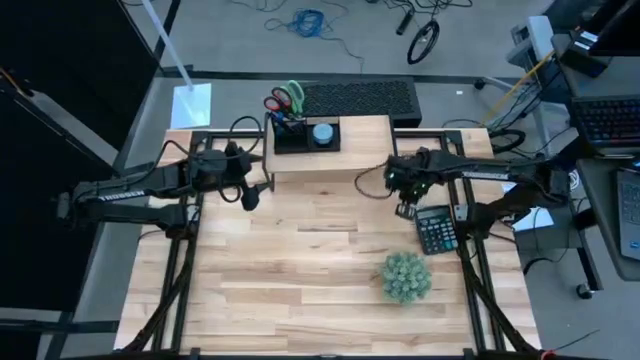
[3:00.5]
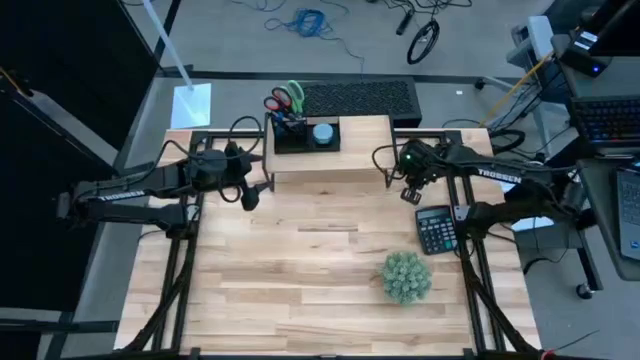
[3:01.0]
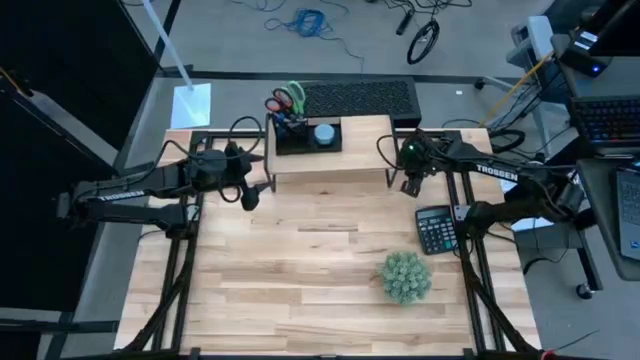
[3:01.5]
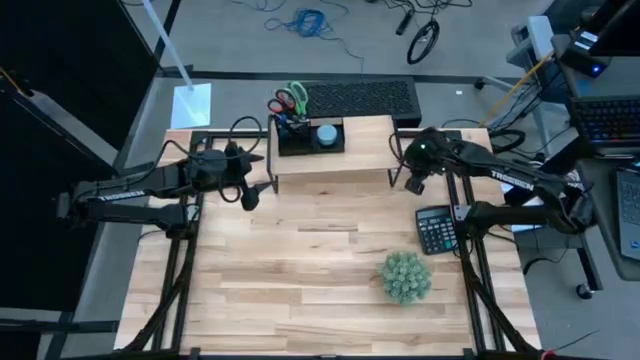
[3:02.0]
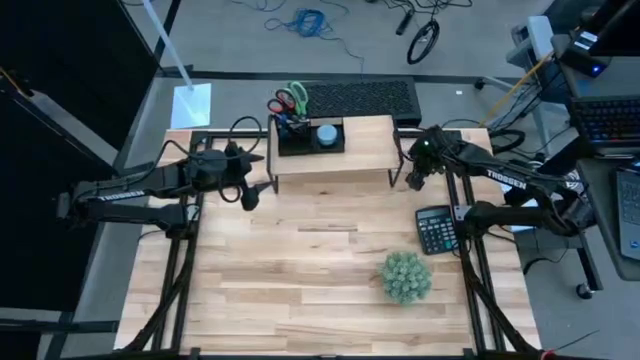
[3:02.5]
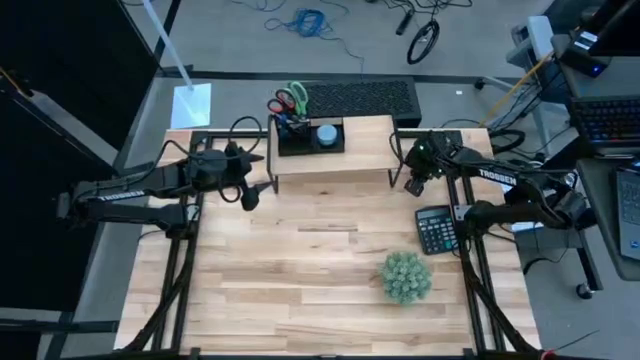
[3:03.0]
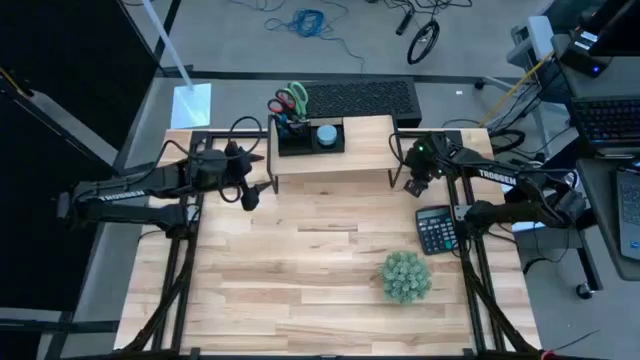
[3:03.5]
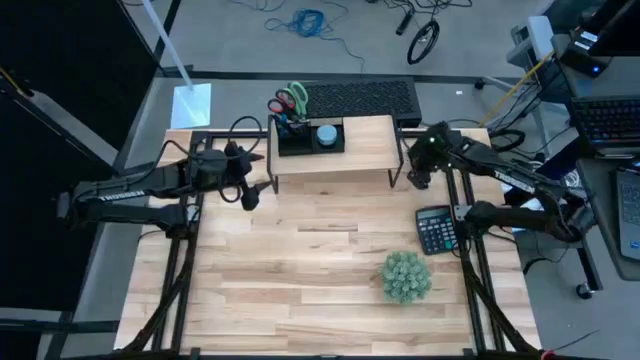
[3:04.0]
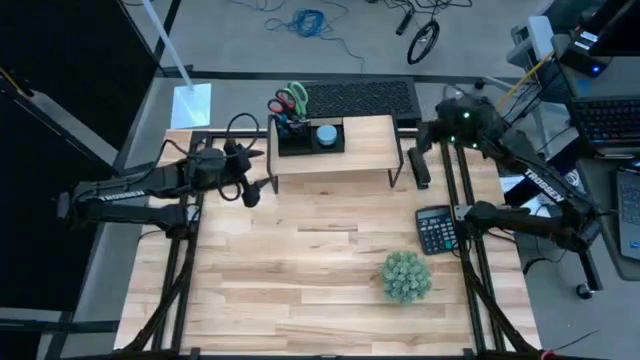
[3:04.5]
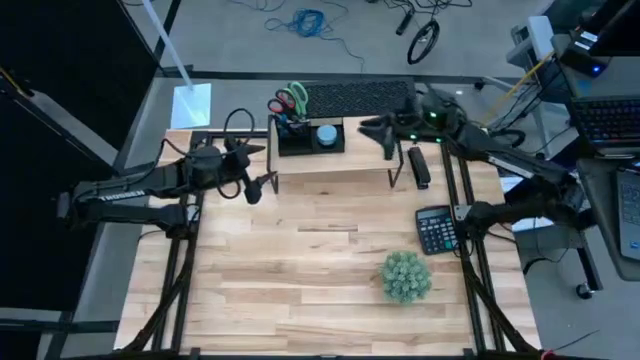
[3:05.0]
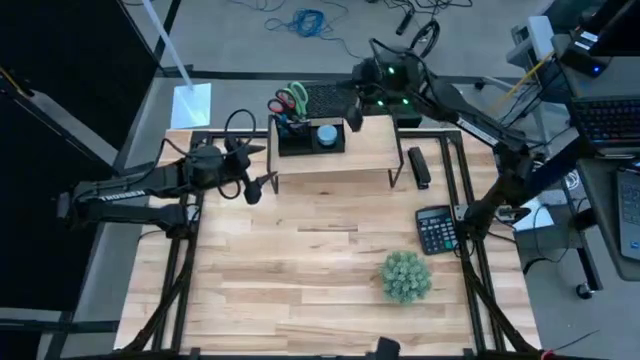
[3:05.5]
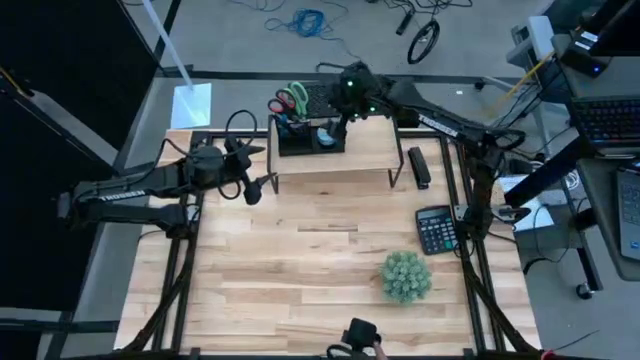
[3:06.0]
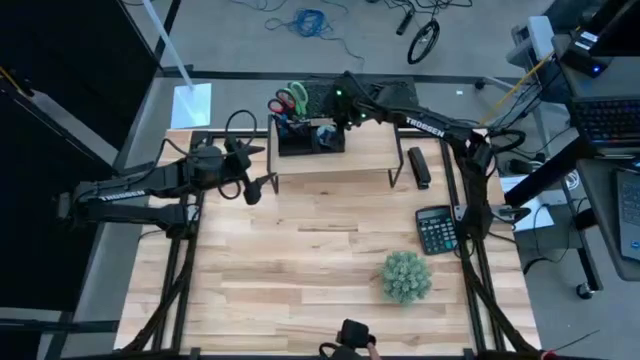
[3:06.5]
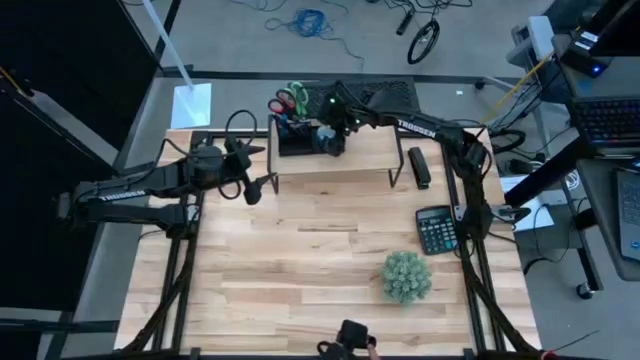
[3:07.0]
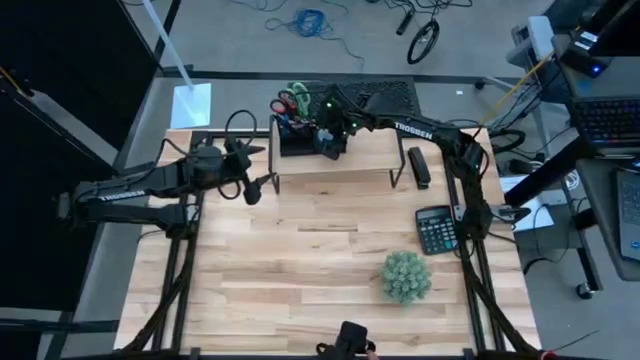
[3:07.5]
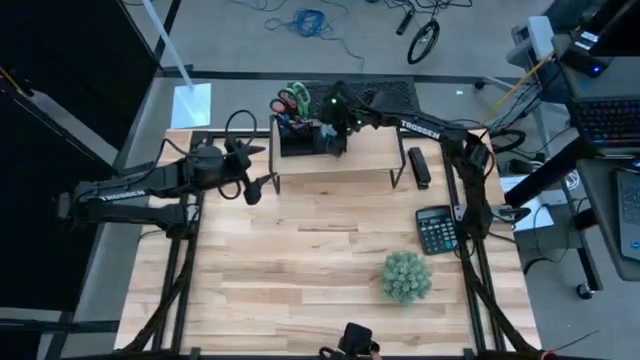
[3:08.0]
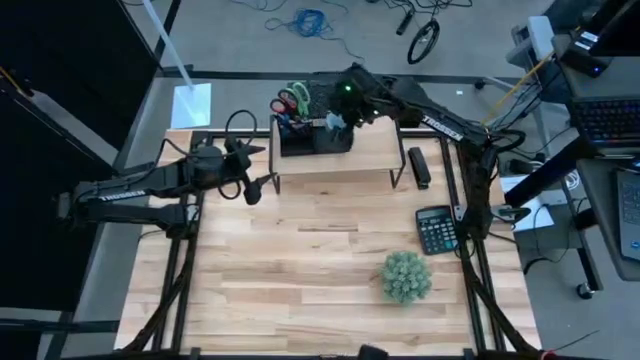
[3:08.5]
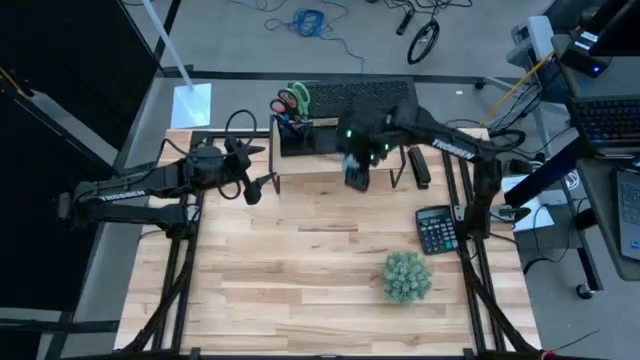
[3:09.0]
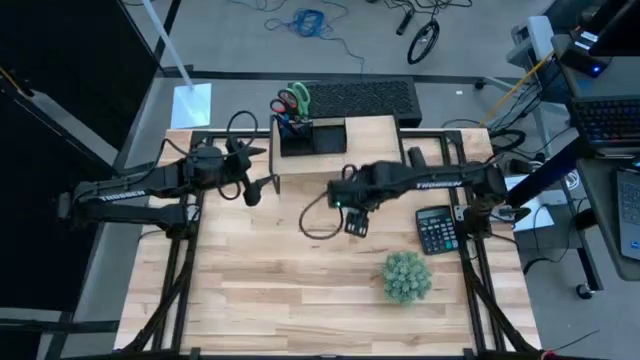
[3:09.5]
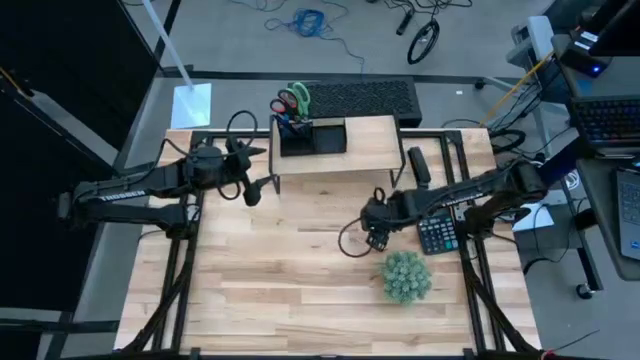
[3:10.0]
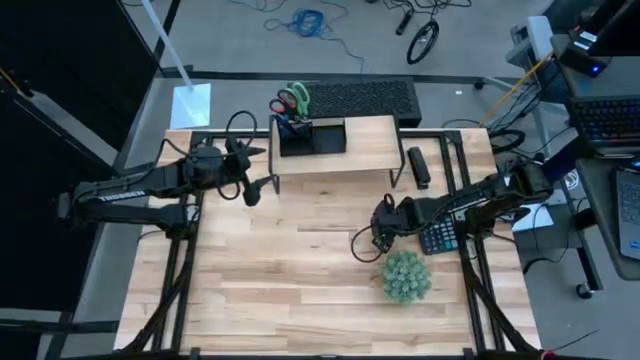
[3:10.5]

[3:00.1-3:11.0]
Task: Pick and place office supplies into organizer
Remove the green scented candle from the desk organizer on the shelf

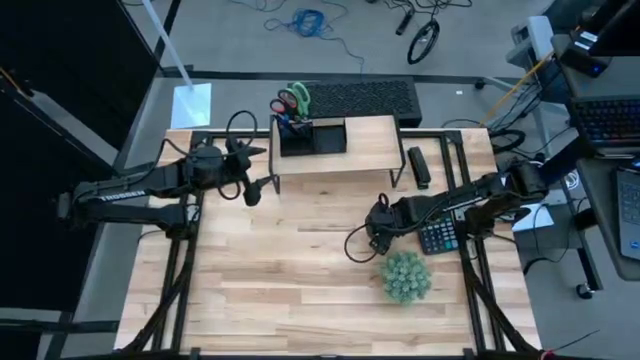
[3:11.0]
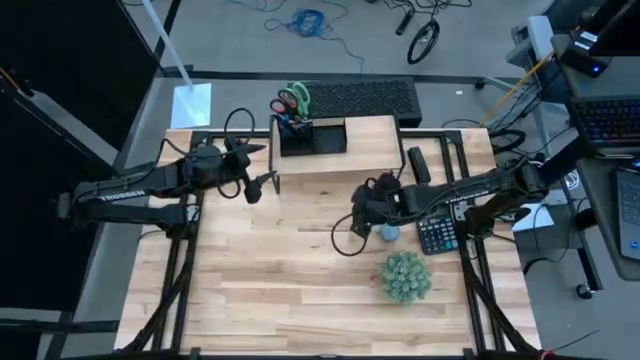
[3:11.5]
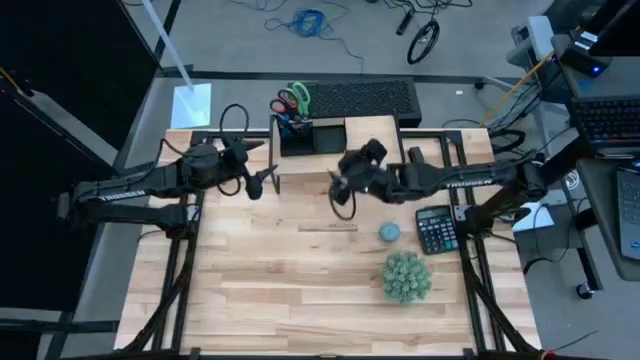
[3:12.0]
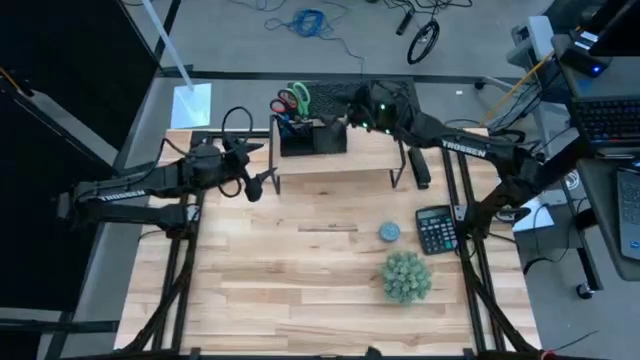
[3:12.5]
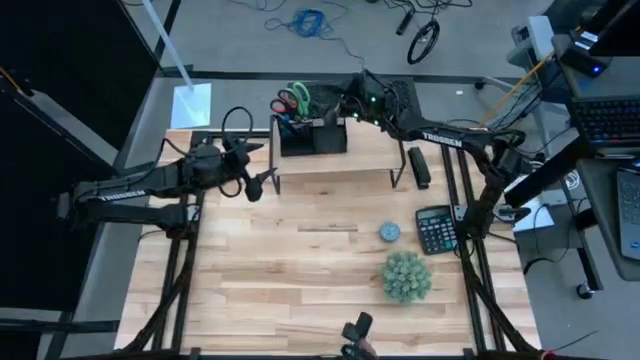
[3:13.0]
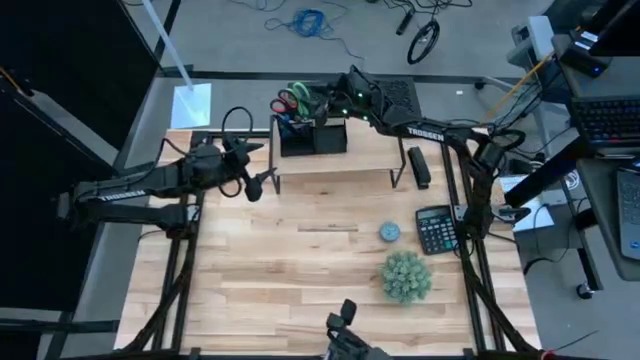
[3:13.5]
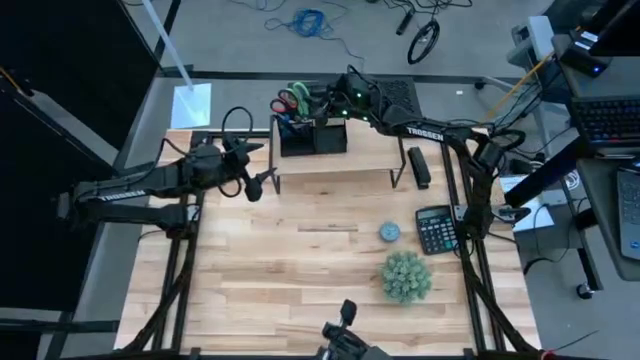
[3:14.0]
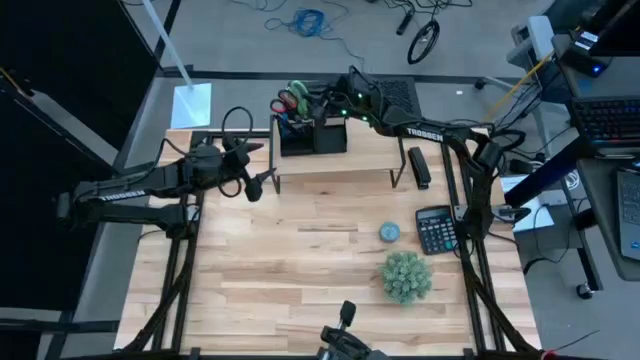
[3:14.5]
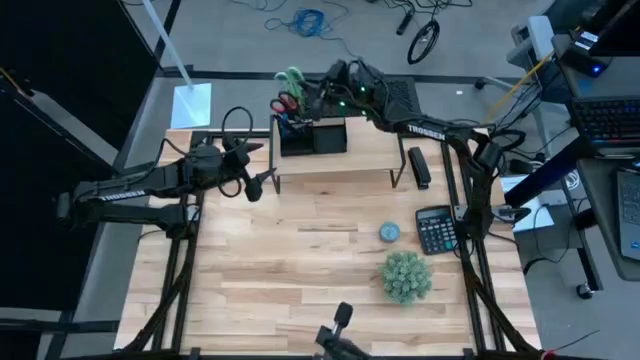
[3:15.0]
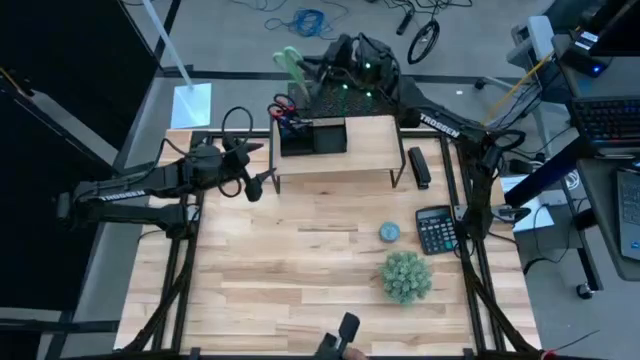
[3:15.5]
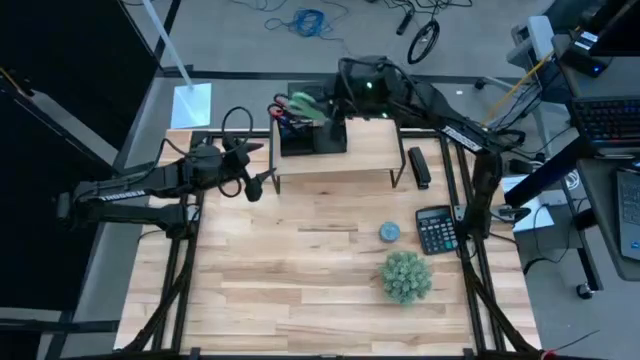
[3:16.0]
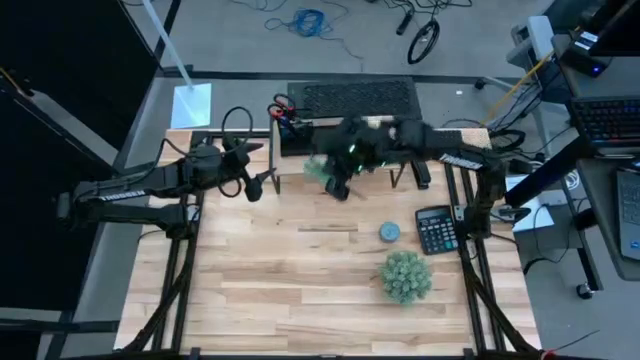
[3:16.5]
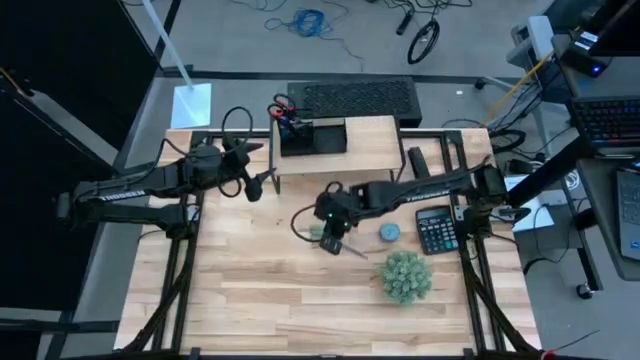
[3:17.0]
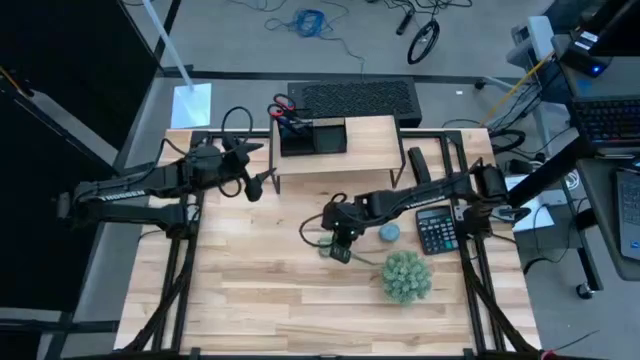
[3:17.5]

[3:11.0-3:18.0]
Remove the green scissors from the desk organizer on the shelf

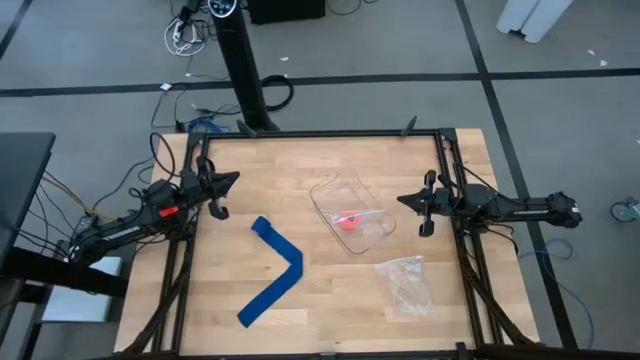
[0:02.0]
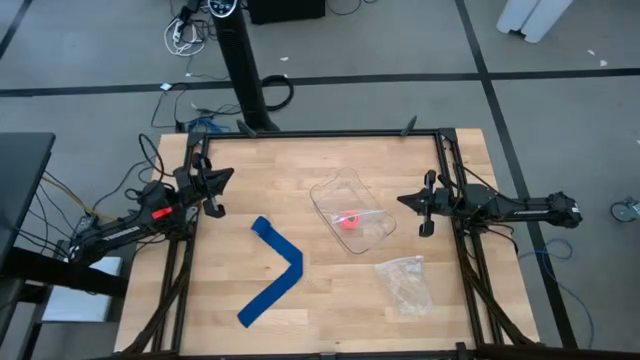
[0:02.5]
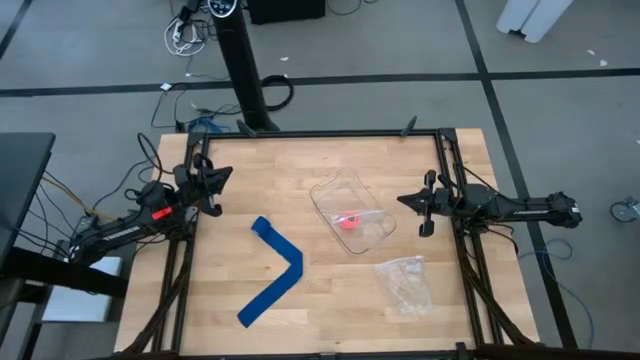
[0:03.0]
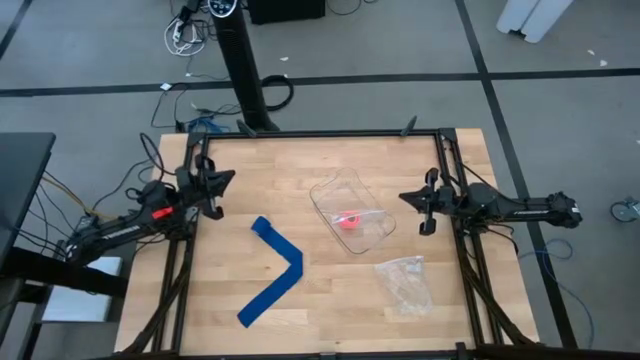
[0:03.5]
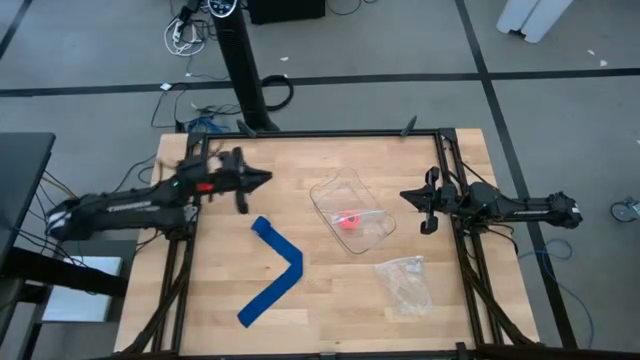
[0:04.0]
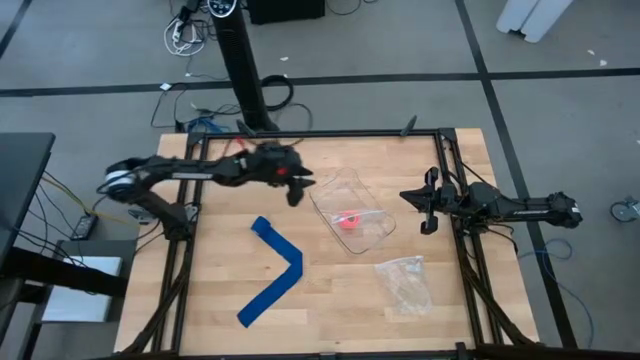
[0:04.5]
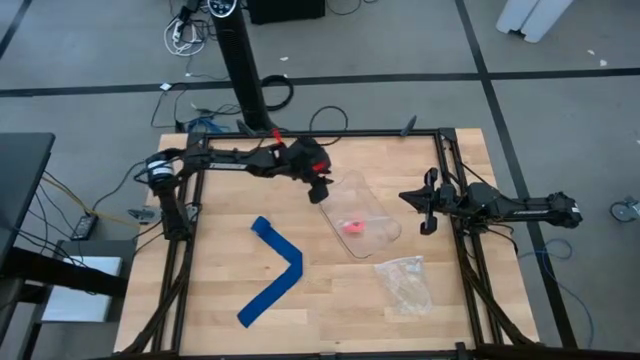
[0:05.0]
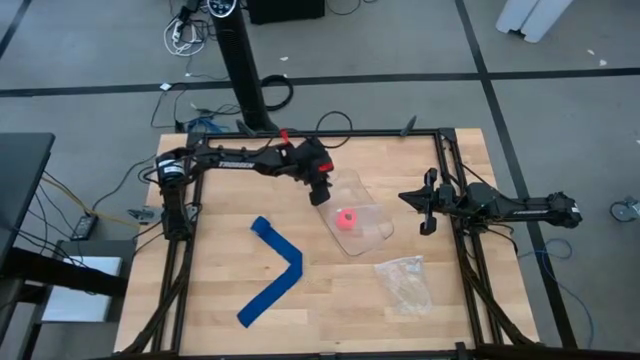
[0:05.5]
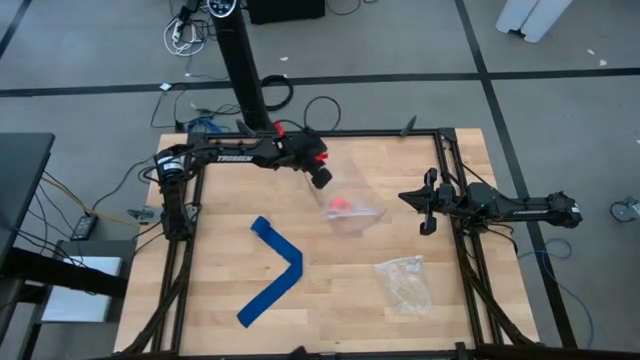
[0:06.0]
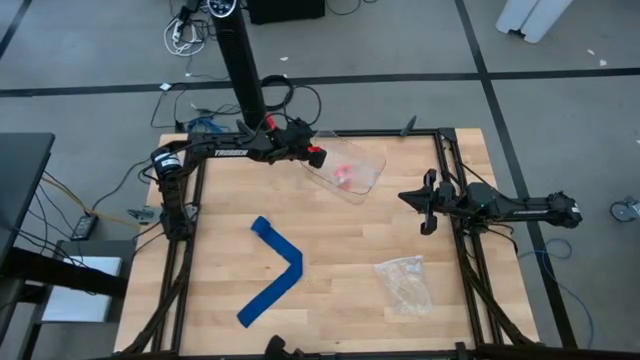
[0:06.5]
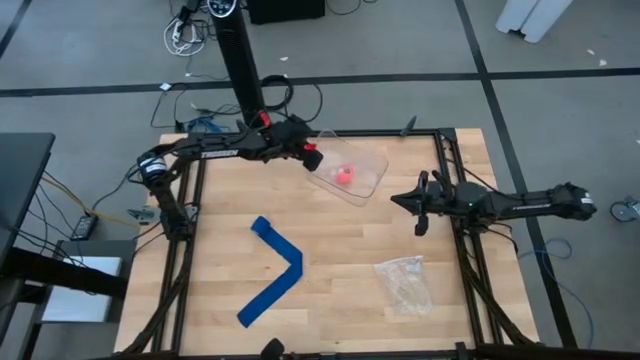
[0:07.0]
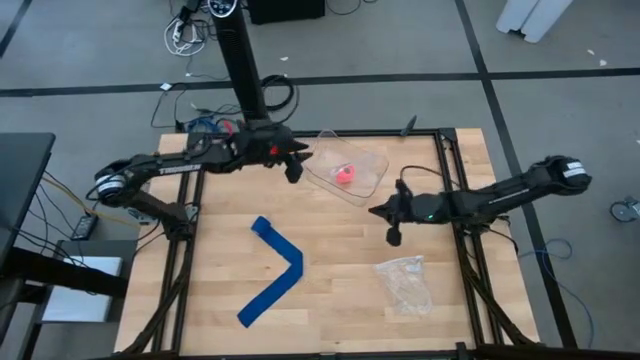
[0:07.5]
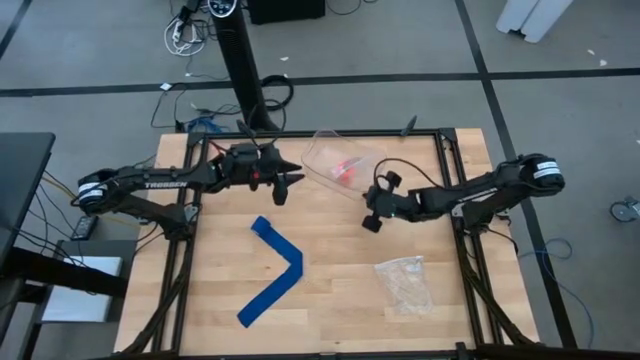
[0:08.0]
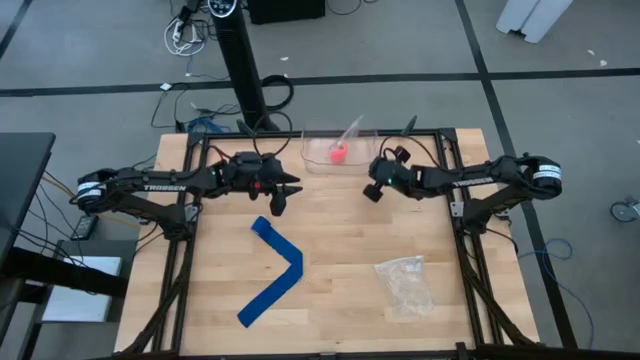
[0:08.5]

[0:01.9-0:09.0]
Task: Roll bandage
Move the transparent bin to the top of the table
